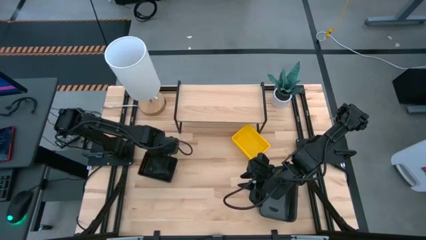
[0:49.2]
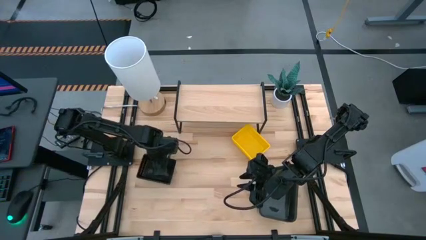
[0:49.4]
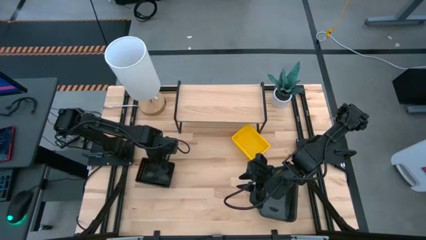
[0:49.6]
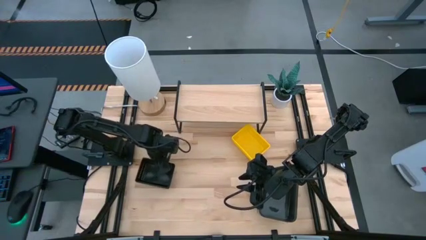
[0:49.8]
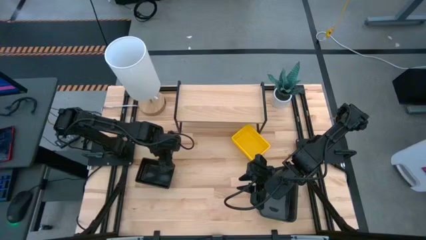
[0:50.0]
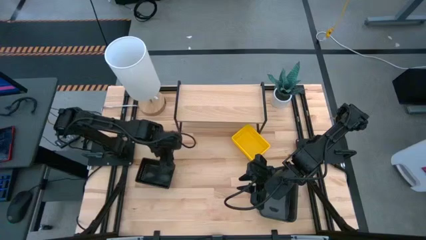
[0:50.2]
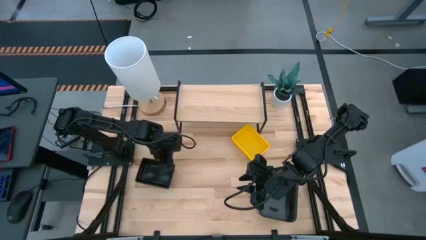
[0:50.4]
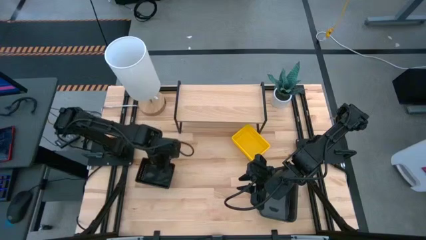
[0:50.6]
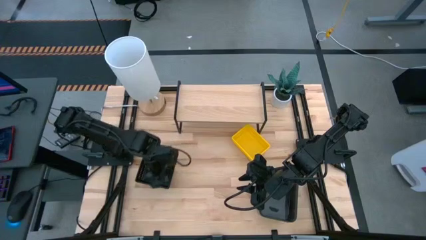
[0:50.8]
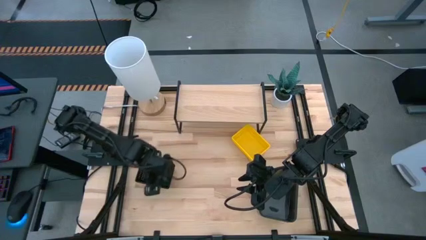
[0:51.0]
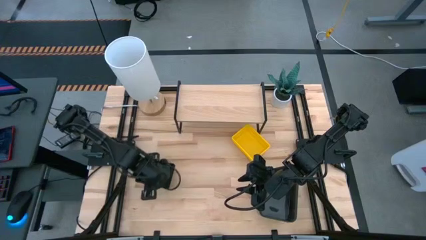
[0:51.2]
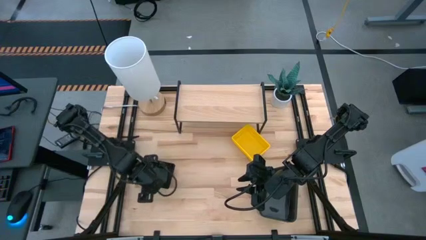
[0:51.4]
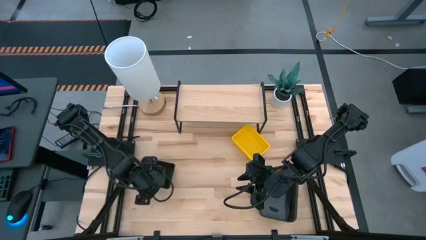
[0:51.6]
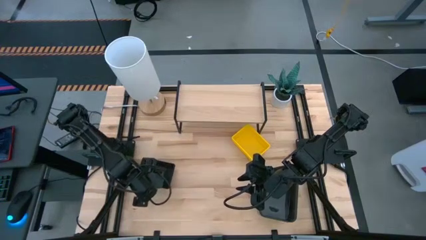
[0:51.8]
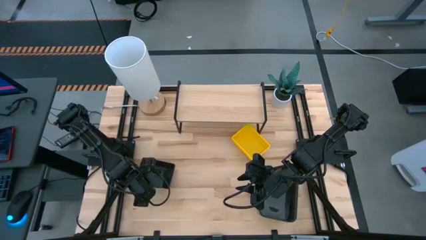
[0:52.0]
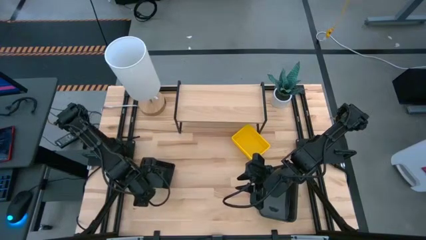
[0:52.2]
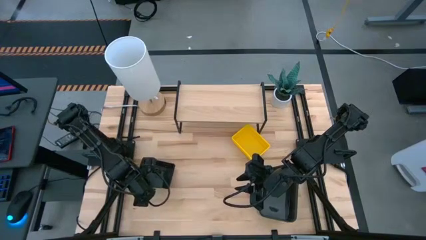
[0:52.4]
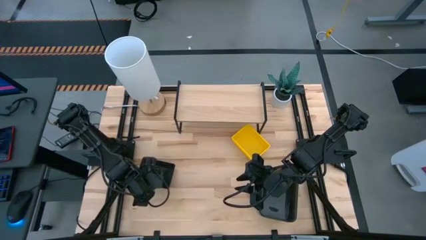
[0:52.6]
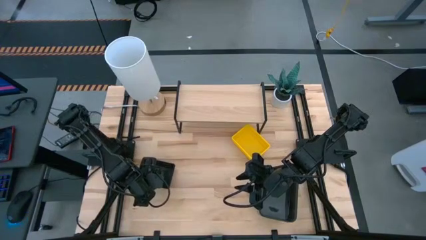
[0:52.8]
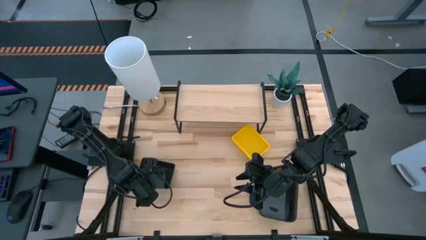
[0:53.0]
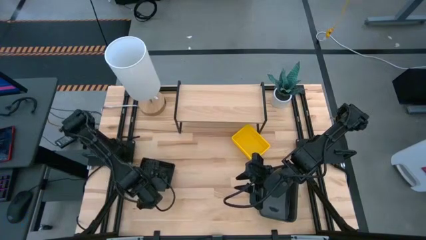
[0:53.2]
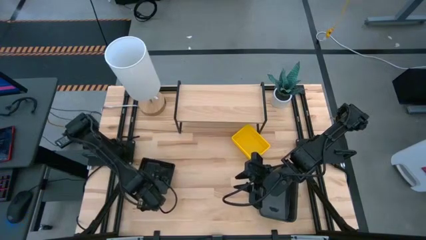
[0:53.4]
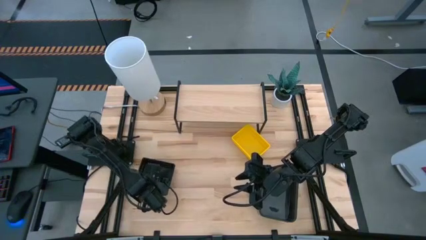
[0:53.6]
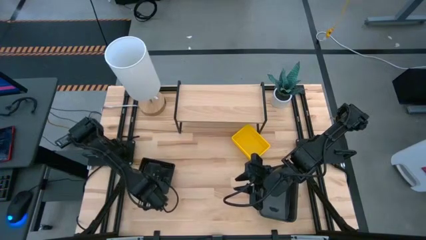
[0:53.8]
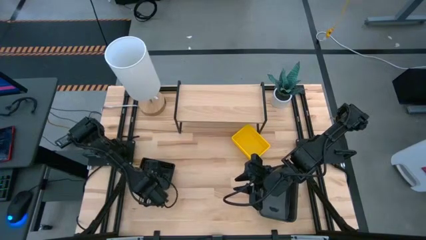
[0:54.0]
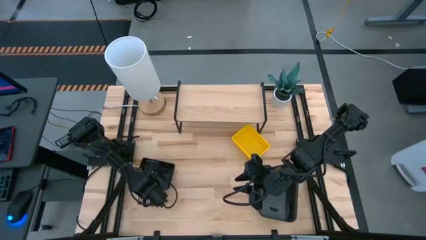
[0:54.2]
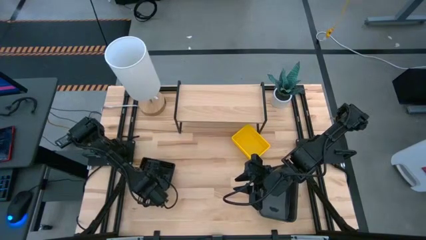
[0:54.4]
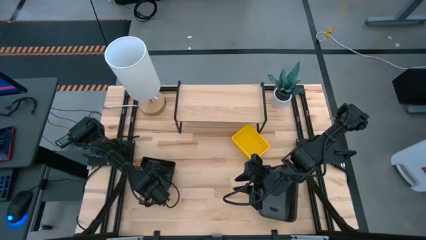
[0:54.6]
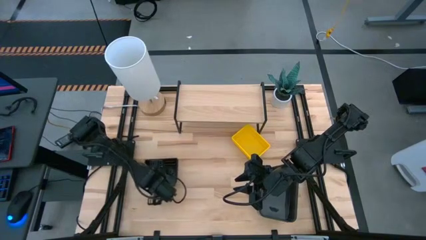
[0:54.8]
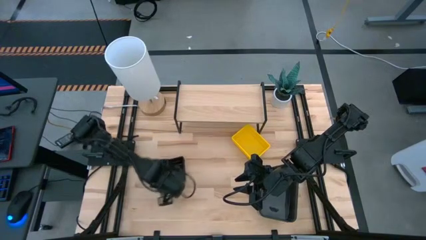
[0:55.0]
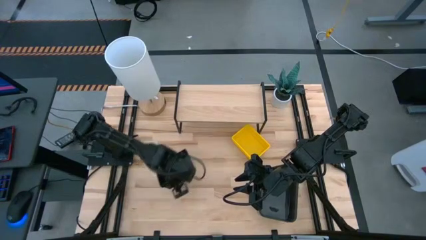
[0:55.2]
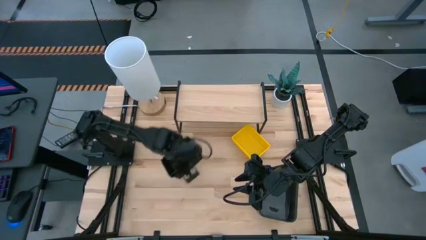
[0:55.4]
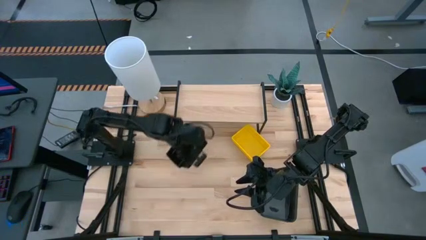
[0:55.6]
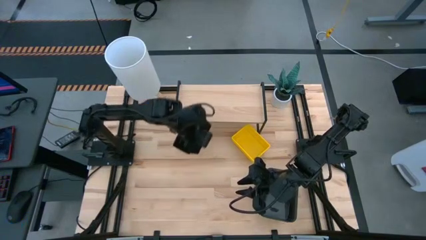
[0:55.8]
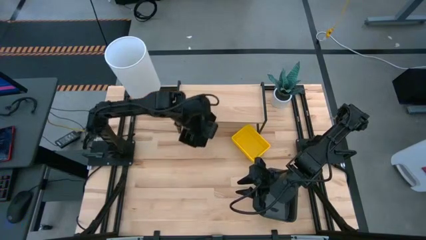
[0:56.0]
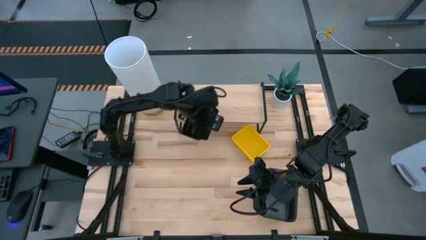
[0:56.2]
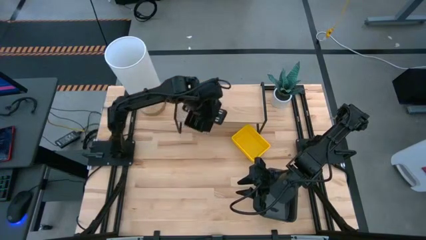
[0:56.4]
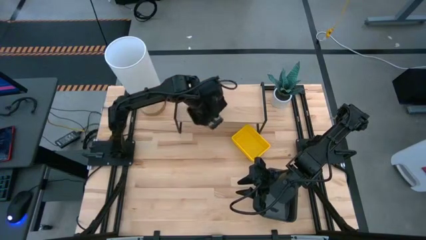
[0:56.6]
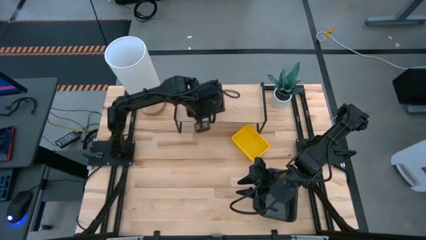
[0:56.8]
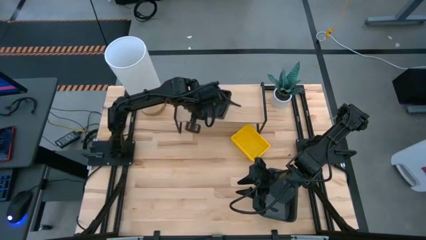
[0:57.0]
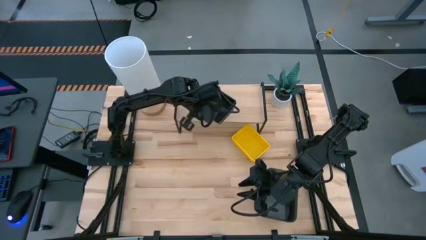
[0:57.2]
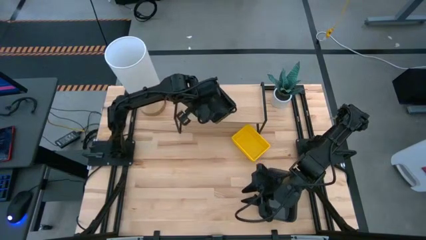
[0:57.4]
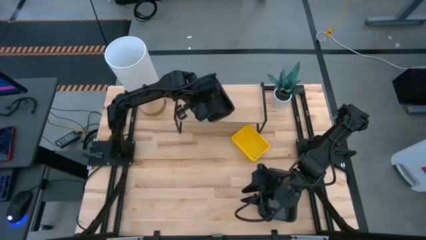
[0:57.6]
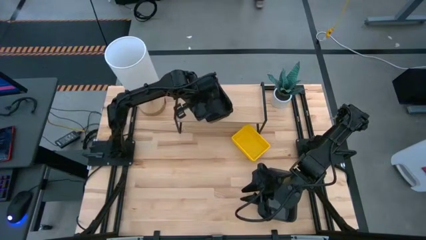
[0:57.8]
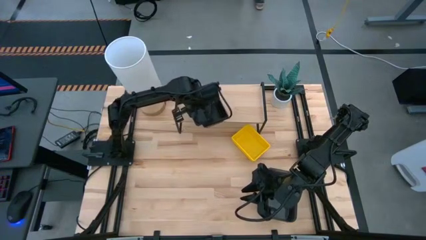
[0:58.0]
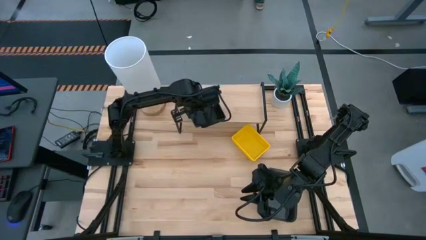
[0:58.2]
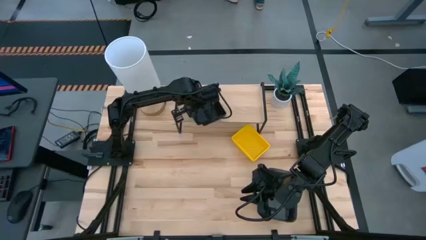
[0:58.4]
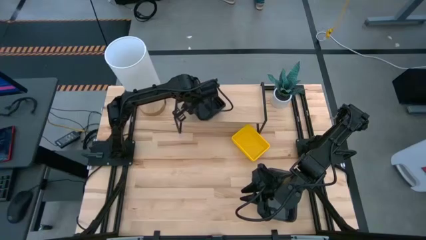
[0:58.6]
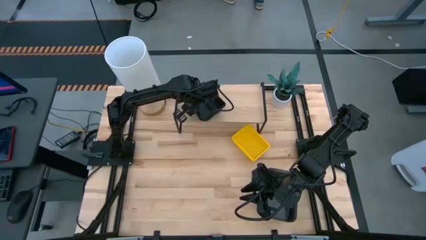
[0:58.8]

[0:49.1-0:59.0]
Task: Stack baskets on shelf by color
Put the stacked black bin on the shelf

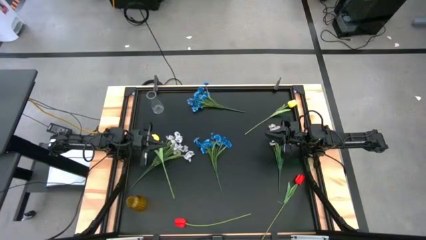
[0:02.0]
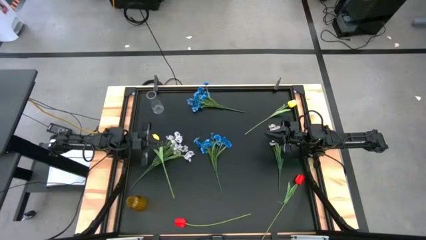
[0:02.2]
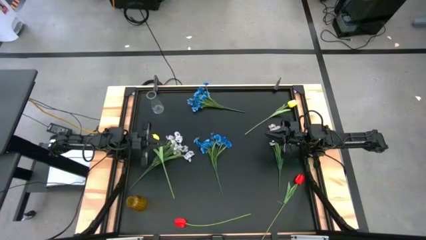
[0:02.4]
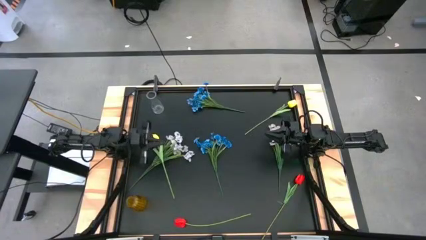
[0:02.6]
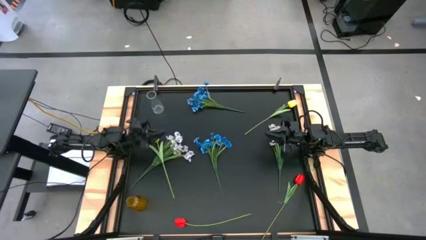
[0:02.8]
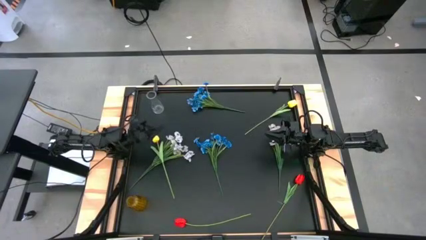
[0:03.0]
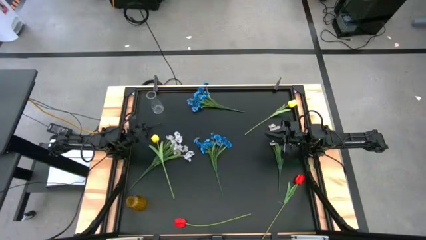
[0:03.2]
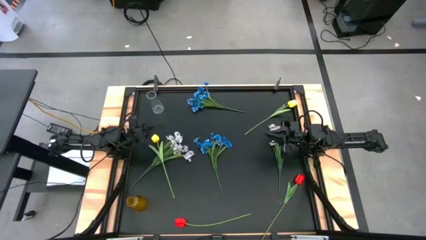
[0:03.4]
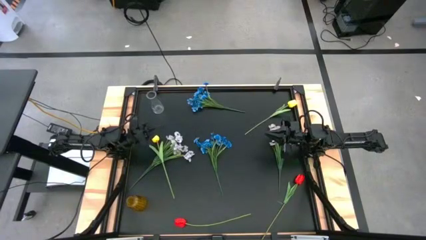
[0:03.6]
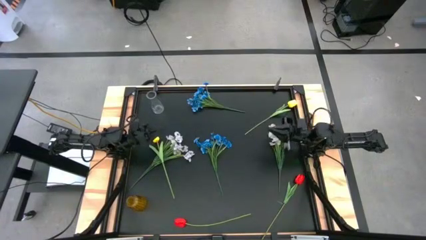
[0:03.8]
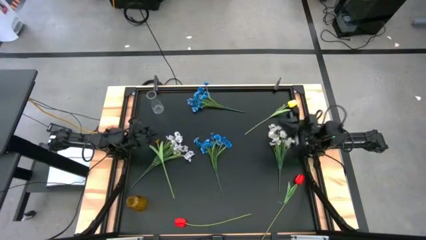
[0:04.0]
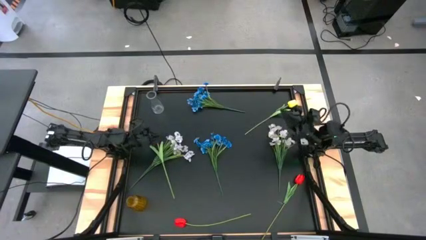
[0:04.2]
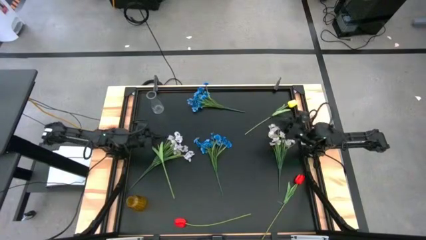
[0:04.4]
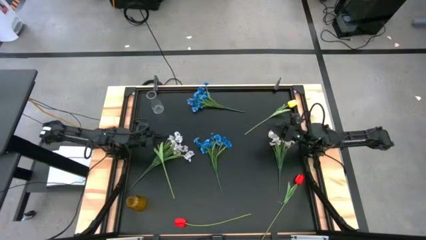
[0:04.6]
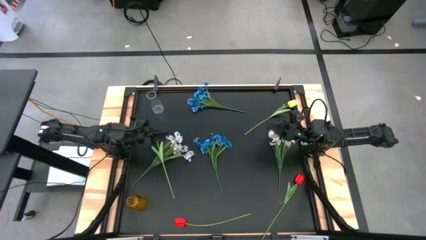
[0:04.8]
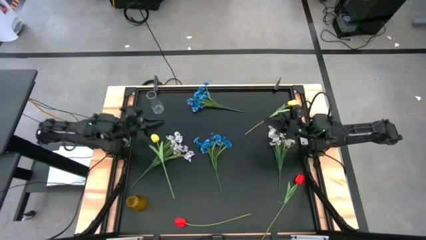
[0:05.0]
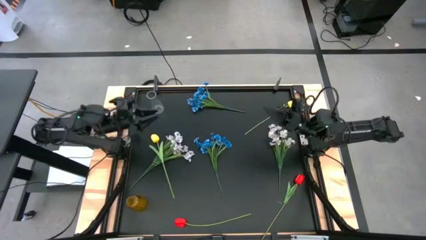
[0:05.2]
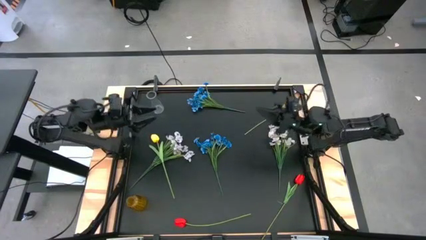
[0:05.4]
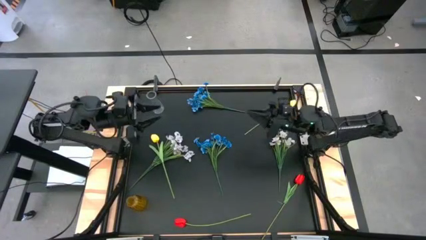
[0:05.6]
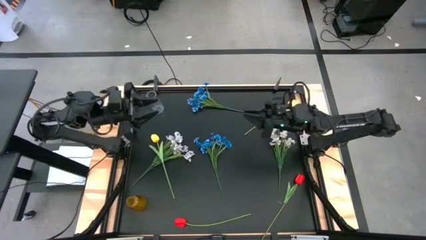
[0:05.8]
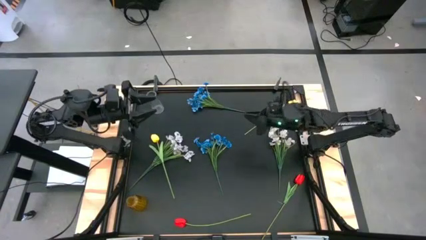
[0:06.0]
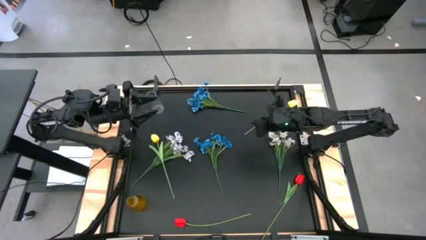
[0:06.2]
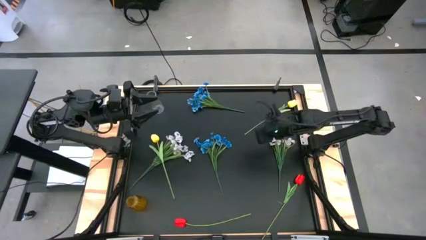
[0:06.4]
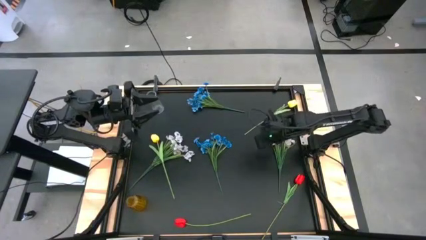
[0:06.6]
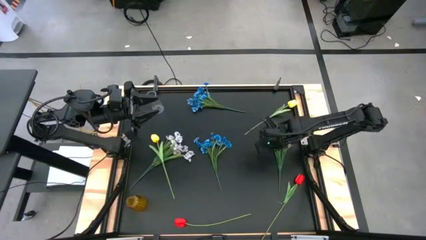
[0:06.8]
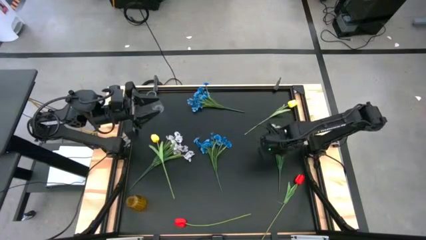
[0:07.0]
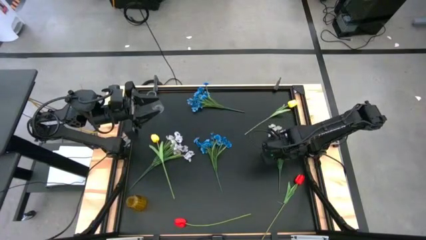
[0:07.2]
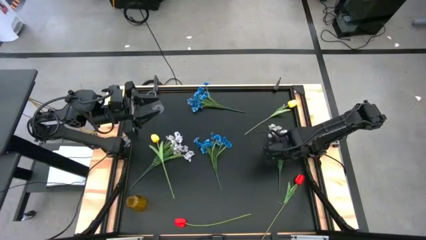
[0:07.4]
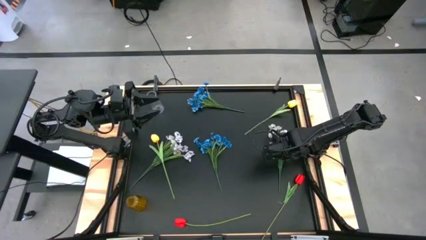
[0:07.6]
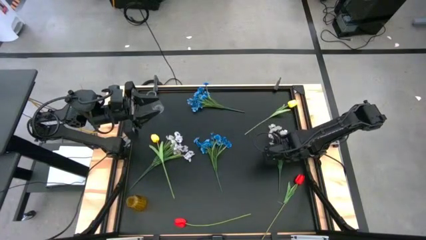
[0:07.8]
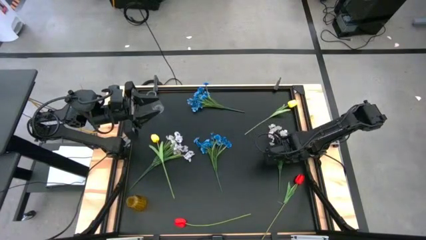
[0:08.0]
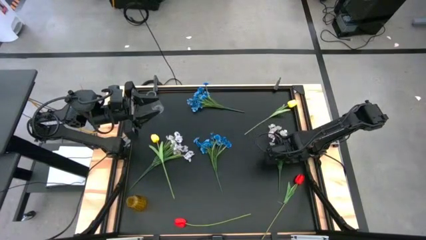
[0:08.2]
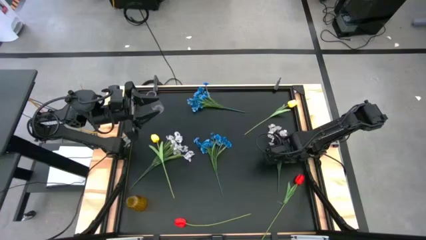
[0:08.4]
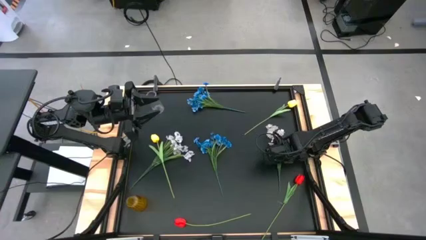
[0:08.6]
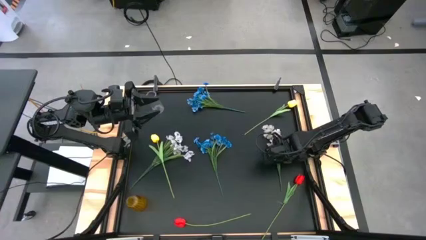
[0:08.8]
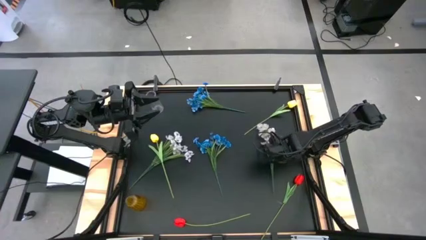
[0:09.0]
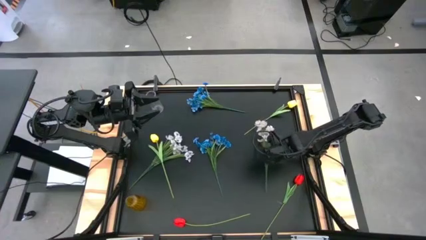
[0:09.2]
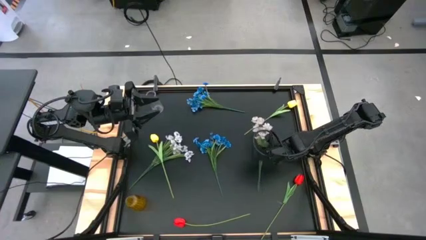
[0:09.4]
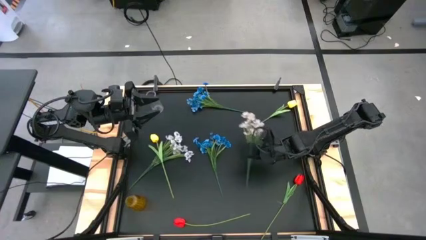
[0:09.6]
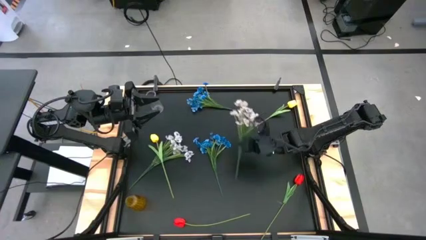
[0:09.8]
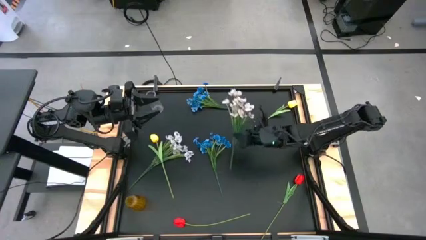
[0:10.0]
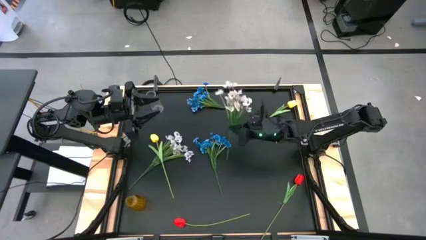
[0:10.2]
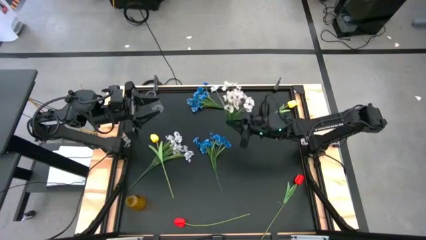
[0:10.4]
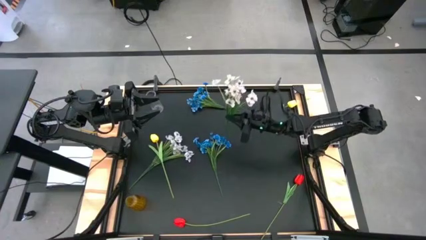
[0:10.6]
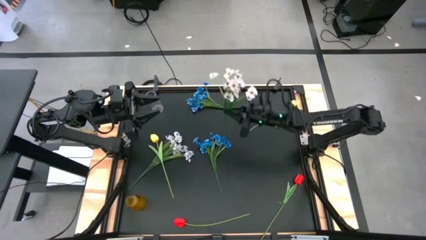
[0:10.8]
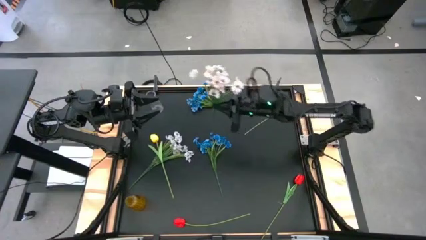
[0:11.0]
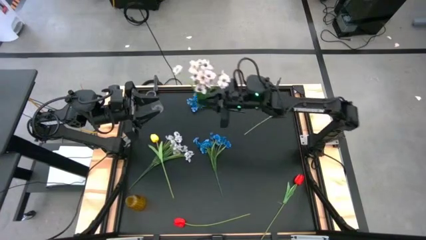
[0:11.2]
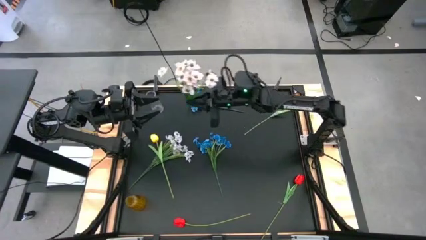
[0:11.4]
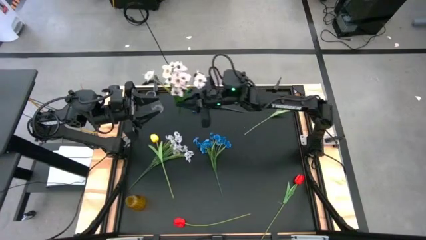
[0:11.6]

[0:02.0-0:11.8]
Task: Sort flowers into vase by color
Put the right white flowers into the transparent vase
